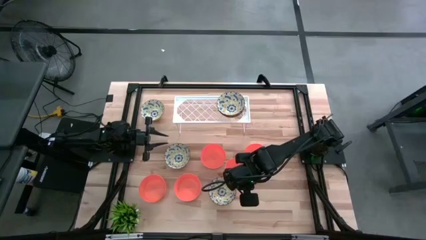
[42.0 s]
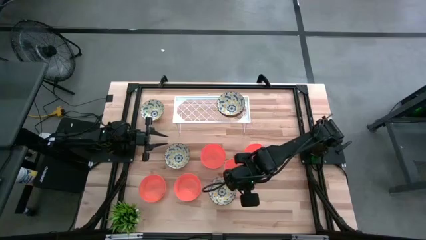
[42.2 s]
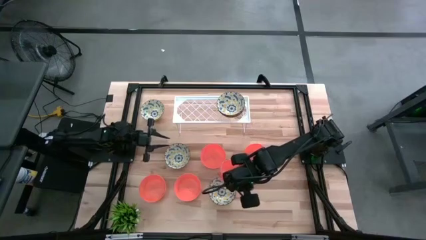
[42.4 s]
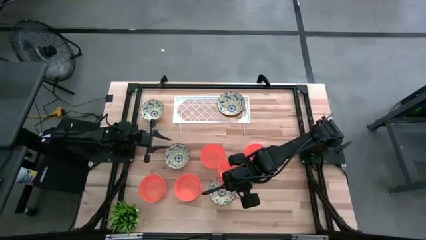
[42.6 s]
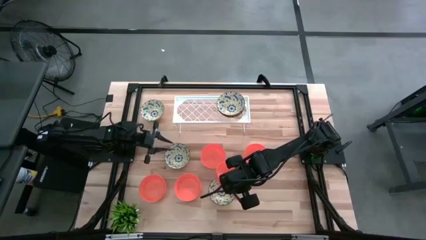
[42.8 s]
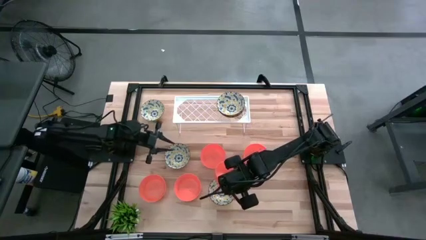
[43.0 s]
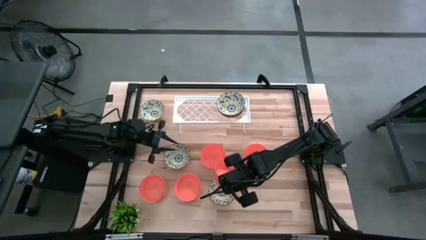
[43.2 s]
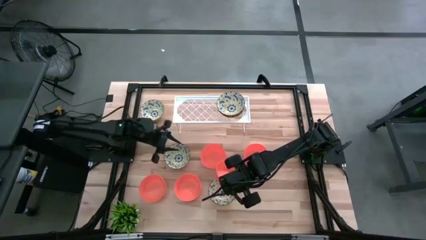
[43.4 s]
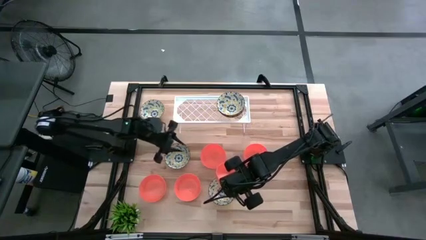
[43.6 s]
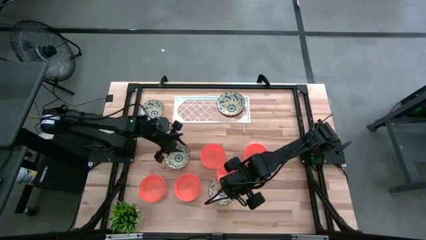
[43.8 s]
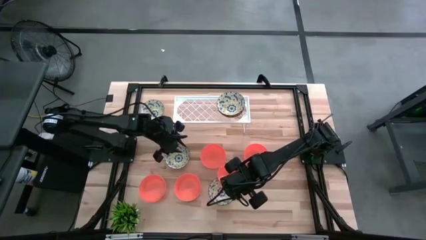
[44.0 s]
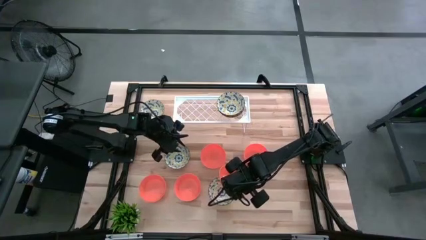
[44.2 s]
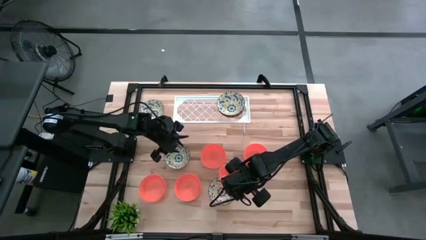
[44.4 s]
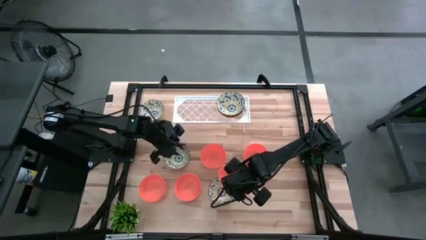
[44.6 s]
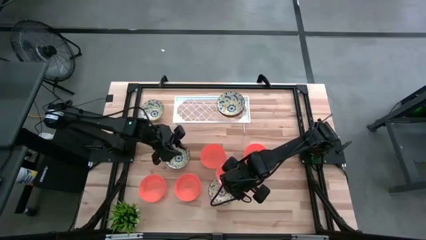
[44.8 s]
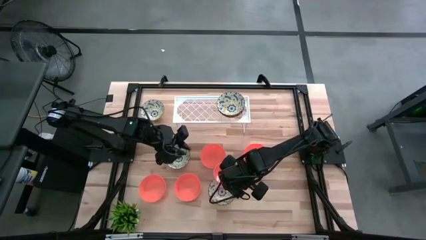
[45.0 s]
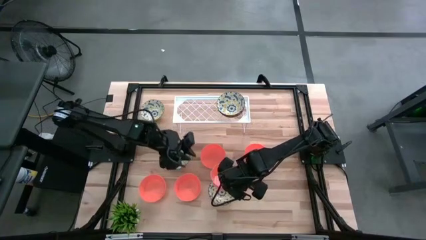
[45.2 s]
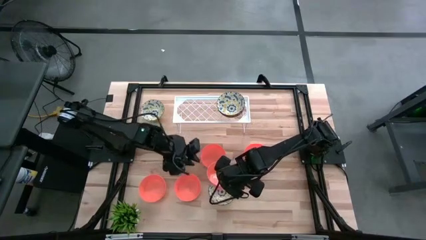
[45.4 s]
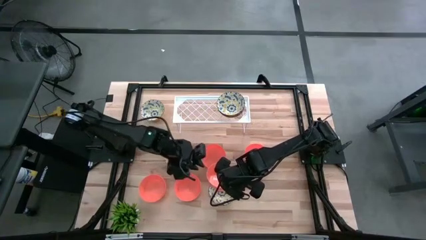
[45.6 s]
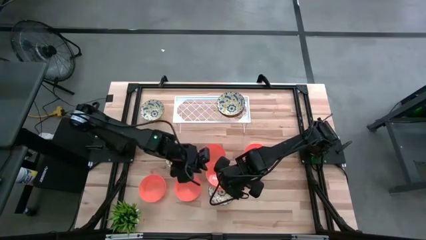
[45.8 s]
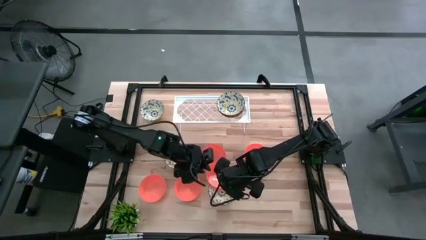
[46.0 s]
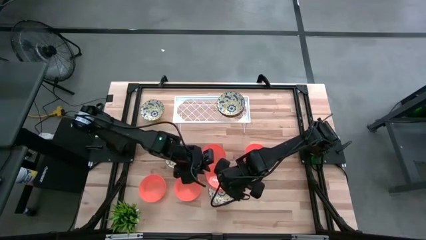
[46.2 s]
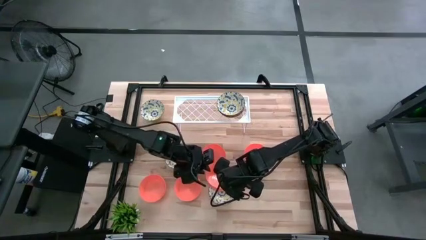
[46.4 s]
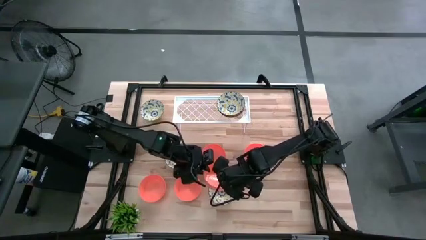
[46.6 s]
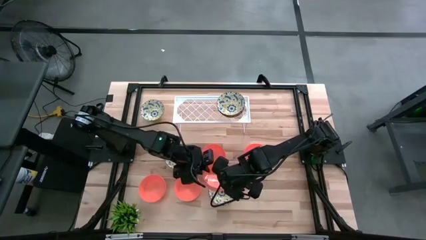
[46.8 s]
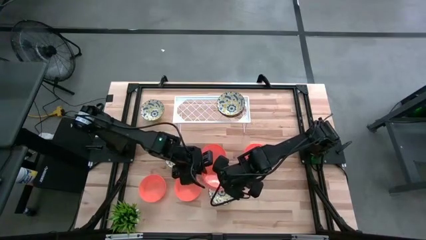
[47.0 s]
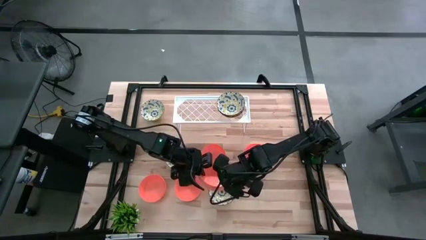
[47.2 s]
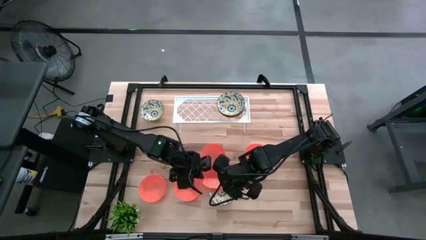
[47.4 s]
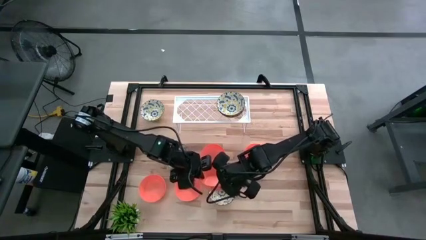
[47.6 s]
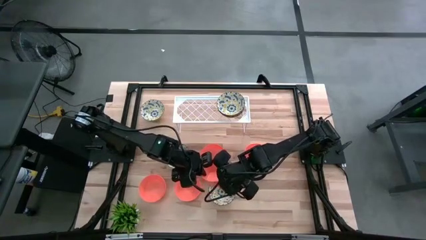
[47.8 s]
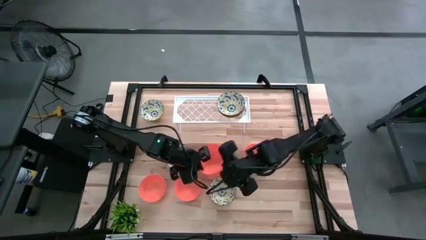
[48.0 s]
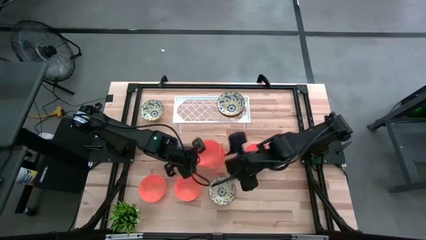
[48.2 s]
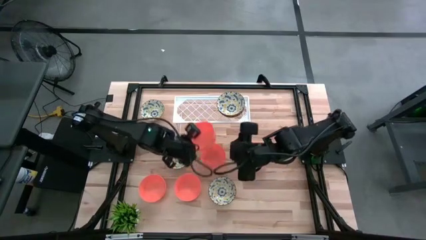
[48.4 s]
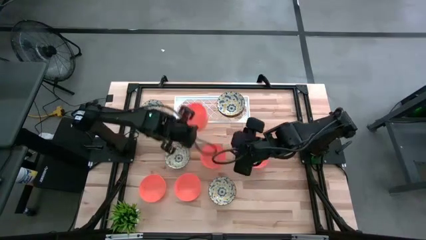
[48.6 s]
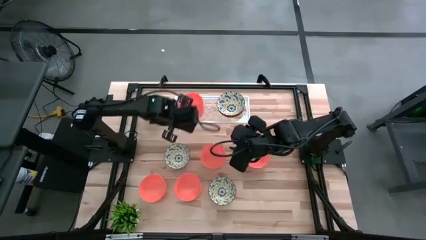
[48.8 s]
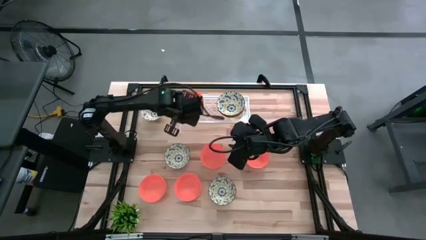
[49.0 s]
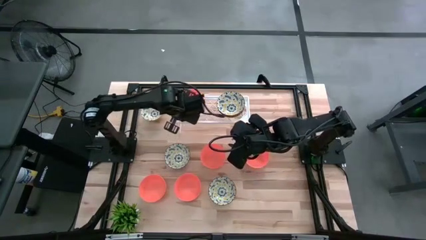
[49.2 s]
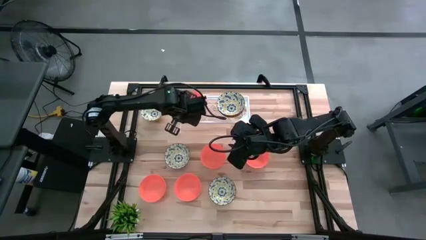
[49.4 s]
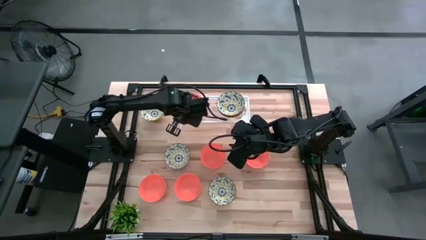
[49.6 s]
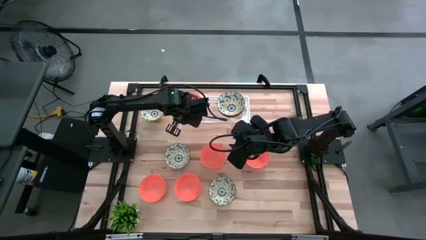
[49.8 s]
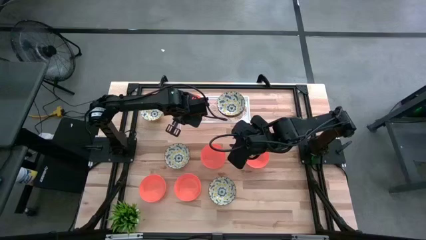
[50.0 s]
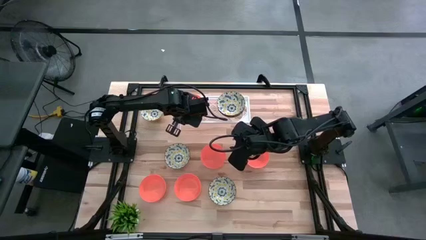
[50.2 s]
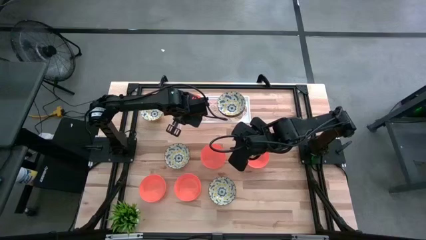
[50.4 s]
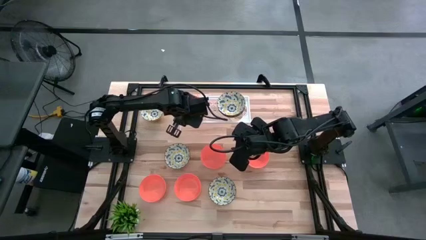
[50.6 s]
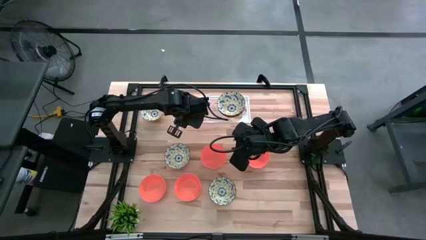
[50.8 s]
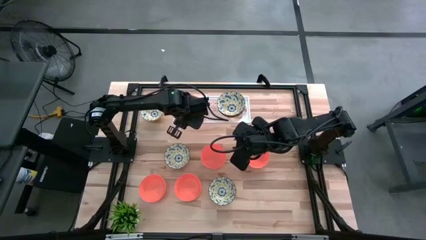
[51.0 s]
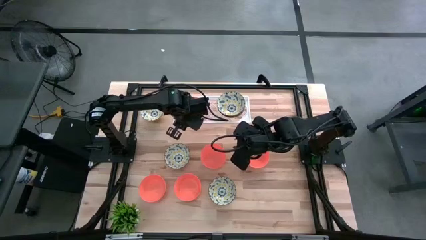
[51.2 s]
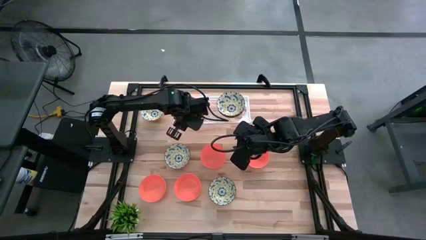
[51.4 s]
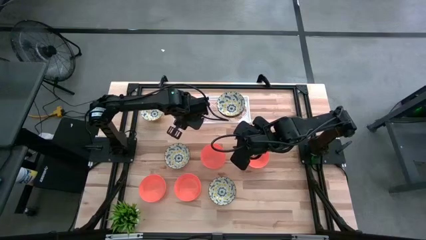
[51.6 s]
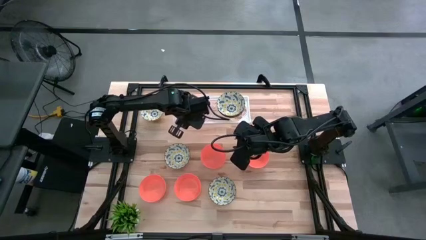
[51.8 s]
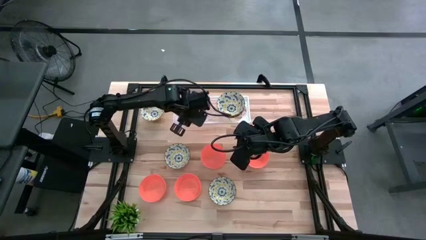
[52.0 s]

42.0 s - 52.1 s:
Task: Pick & Place Mini bowls
Put the orange bowl on the shelf
